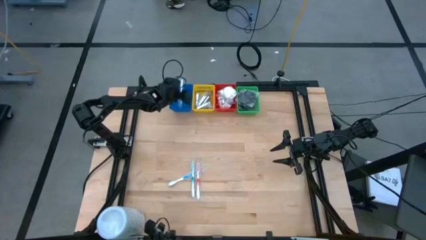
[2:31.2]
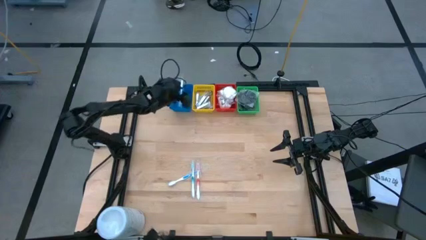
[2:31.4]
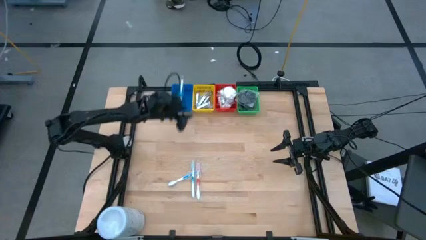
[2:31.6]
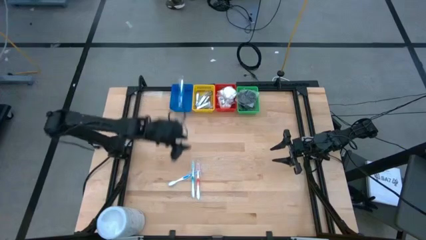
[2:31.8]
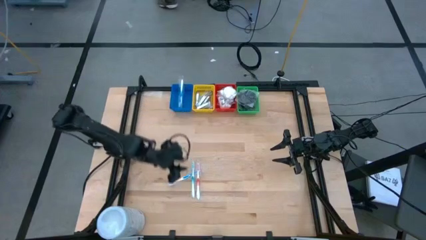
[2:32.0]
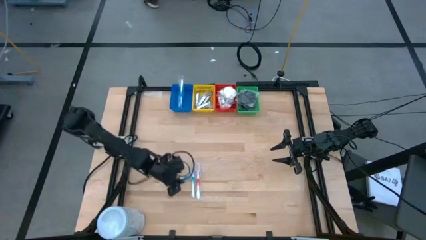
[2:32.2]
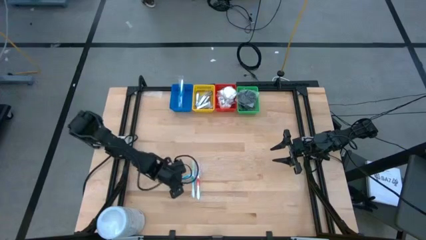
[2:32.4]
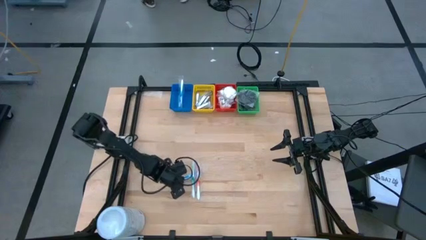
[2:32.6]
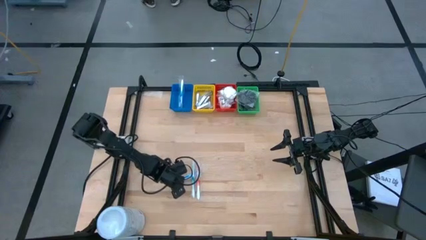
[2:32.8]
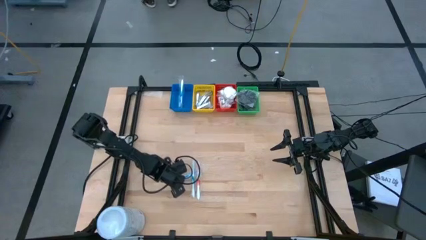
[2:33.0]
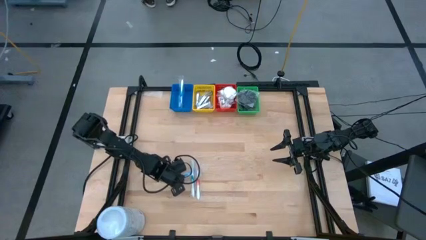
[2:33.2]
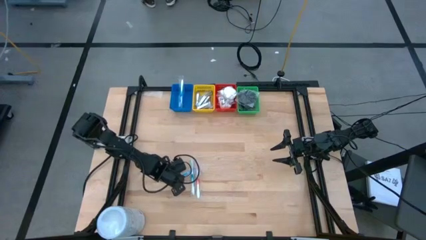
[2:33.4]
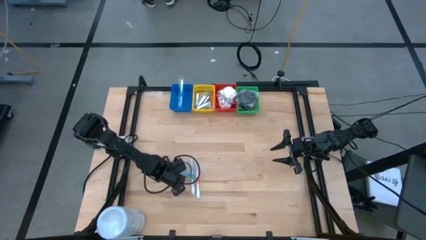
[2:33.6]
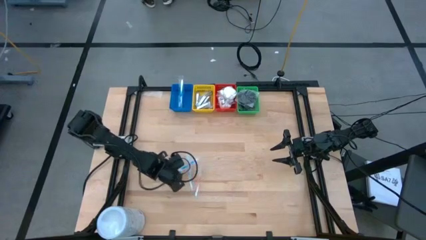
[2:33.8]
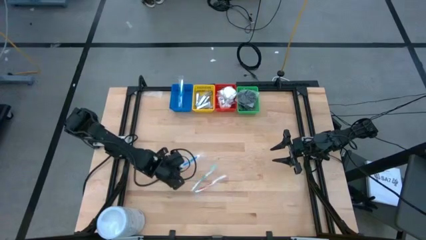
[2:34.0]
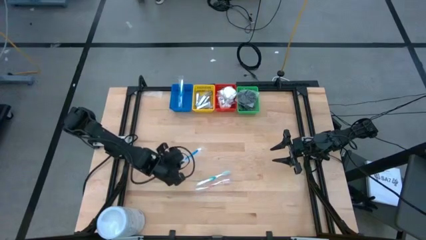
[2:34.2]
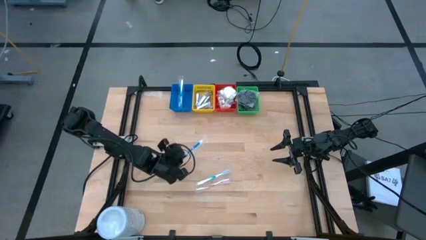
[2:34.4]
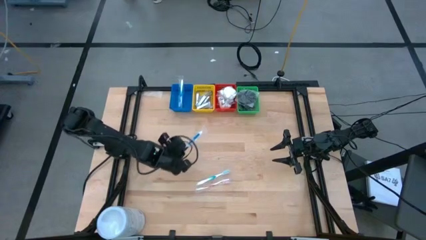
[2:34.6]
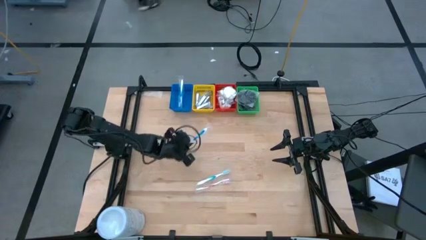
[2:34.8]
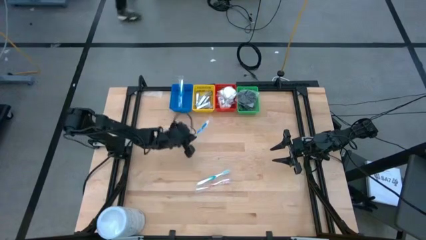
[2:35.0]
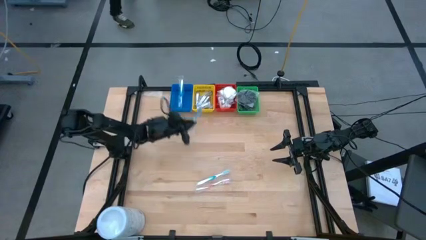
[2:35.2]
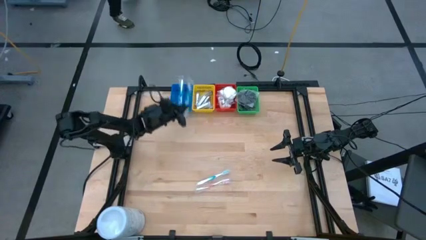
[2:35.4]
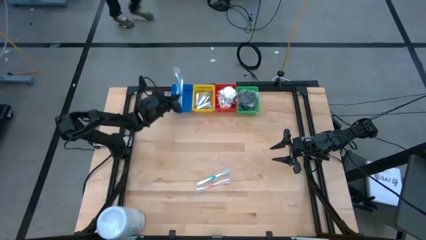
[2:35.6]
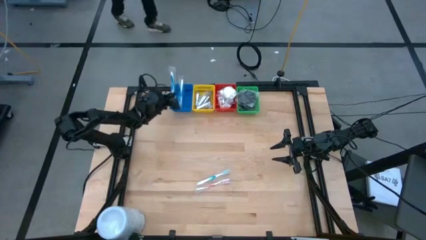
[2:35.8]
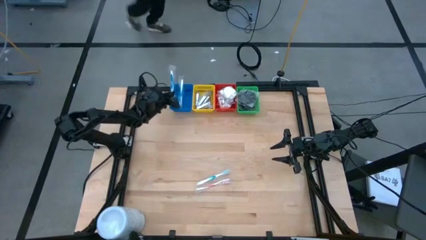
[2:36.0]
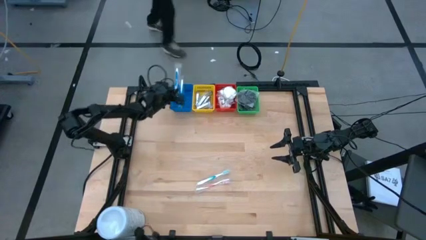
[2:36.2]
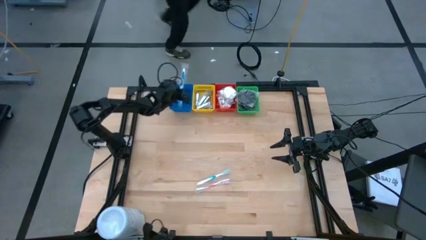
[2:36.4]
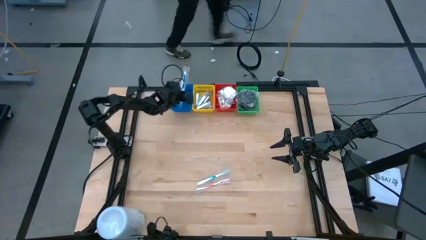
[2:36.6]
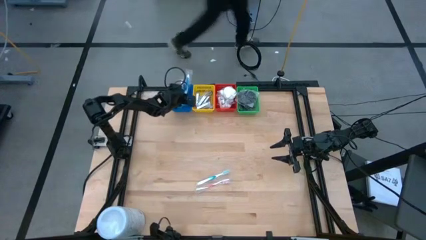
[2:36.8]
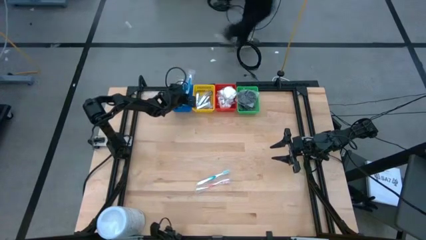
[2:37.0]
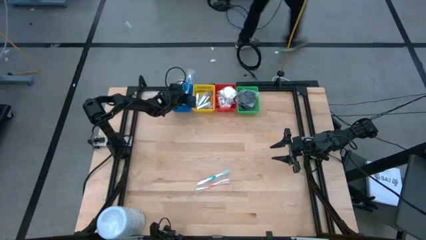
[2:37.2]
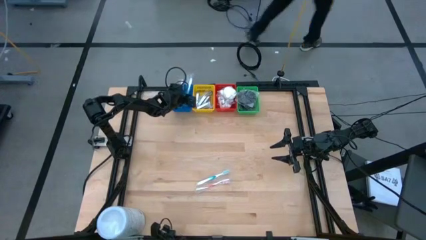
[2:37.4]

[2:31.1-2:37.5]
Task: Pick & Place Travel size toiletries
Put the blue toothbrush into the blue bin

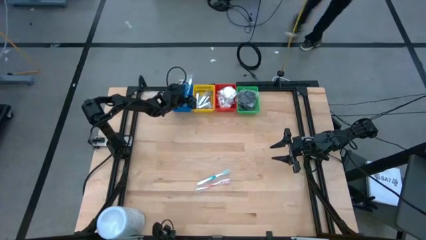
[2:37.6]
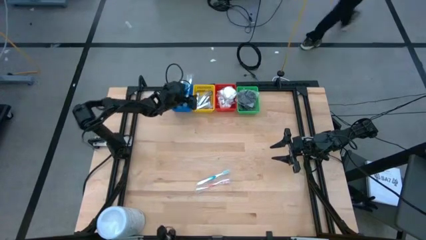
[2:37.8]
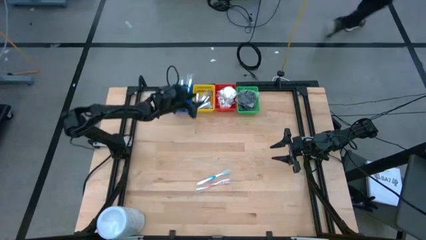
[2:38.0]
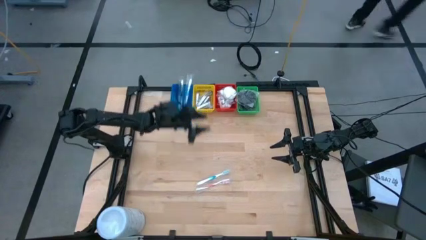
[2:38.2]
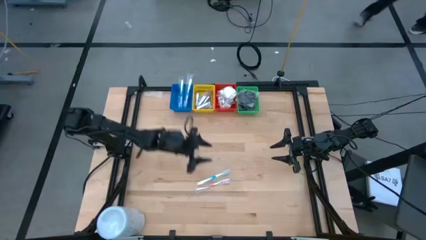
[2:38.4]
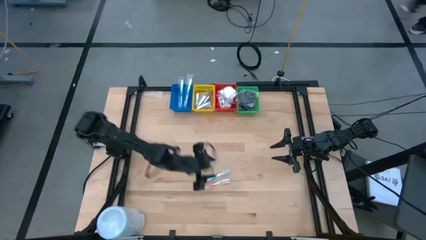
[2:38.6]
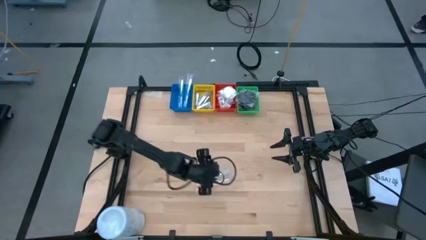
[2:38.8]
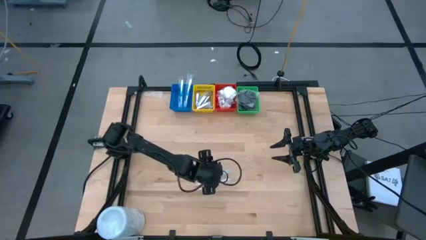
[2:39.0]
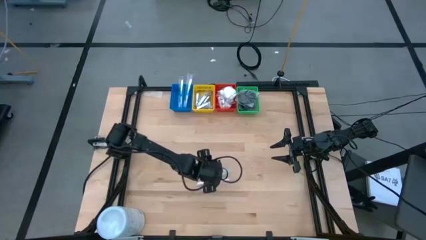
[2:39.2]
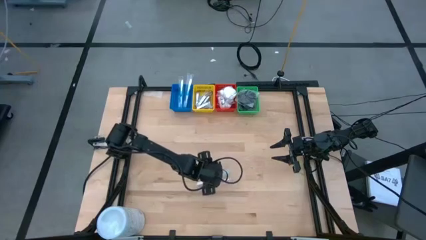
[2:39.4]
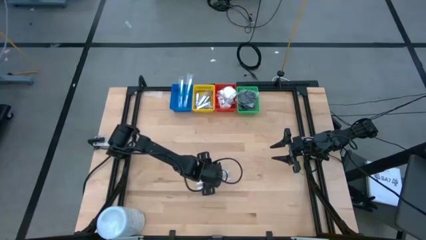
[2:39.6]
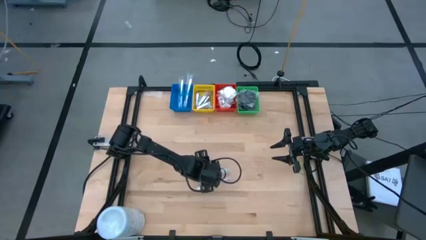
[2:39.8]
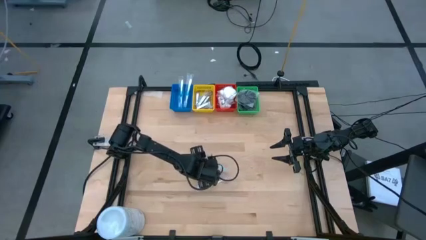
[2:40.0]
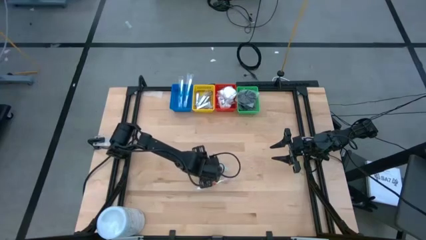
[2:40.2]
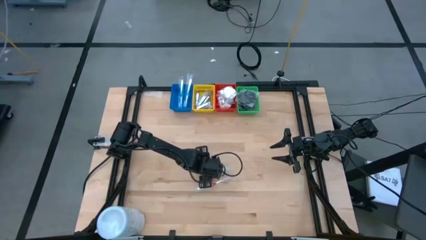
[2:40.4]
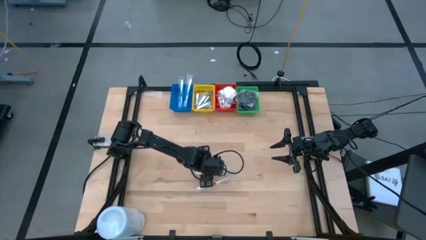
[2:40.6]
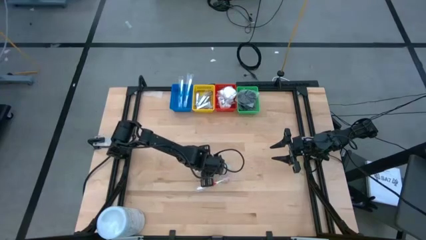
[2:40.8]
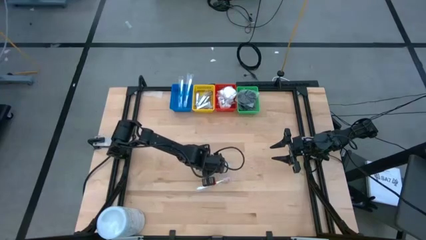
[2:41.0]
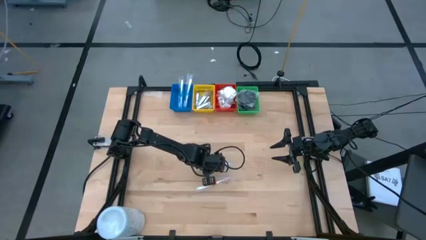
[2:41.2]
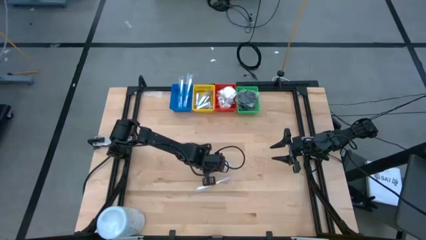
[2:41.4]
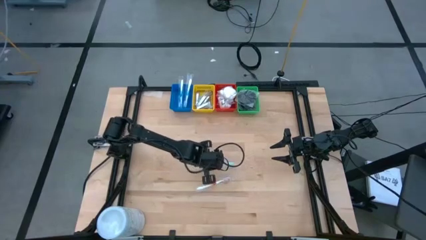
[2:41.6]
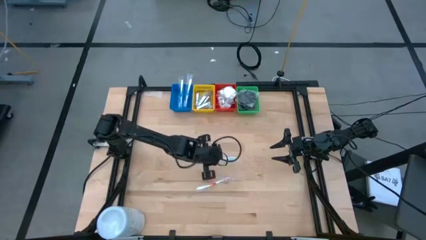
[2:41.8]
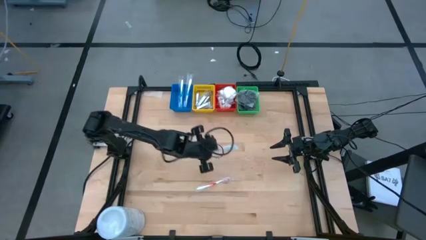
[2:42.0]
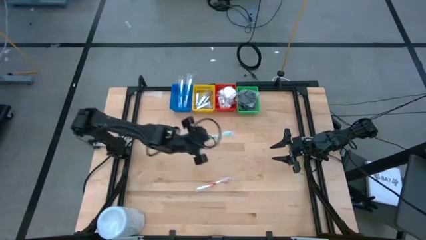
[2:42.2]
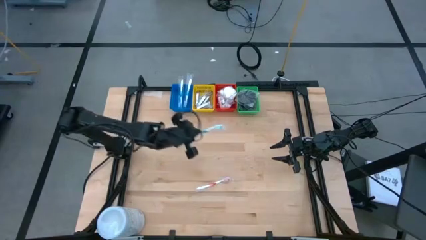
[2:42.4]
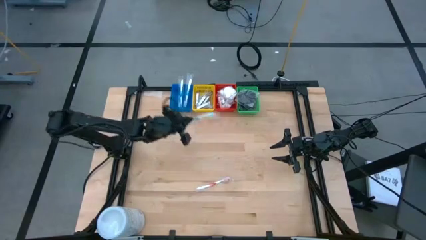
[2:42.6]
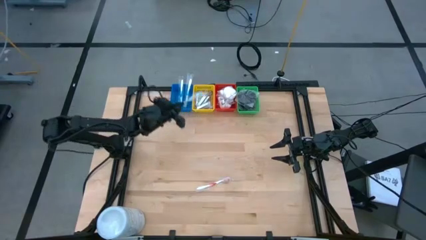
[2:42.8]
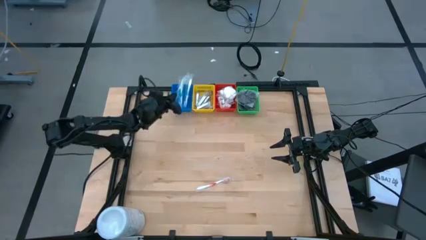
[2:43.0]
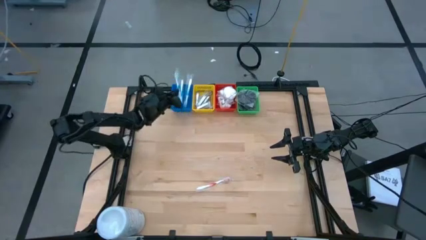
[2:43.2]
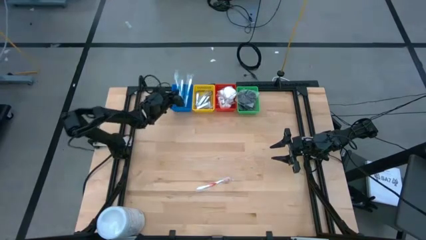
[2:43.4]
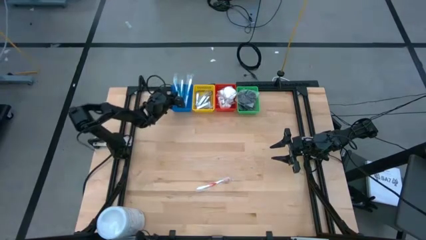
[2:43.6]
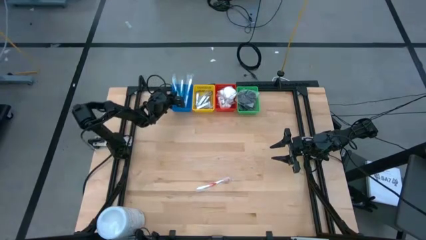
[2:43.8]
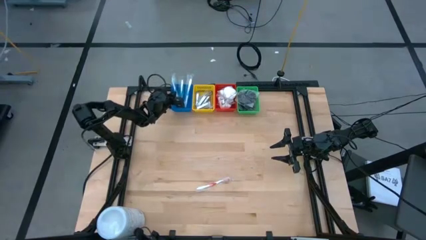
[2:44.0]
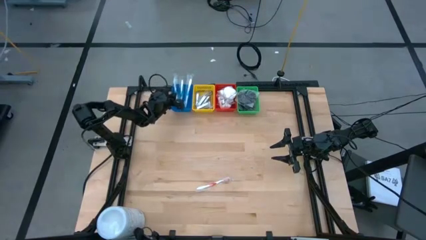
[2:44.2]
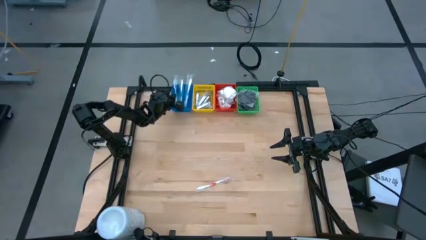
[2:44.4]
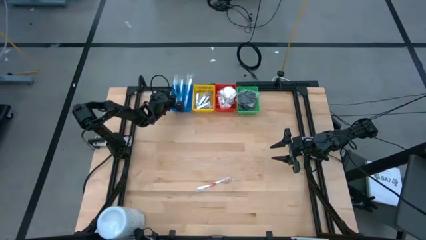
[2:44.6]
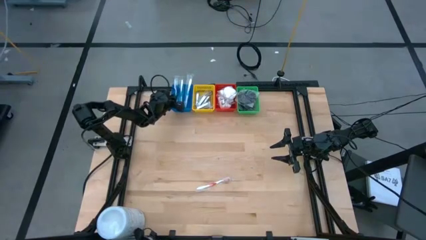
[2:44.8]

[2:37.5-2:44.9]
Put the green toothbrush into the blue bin

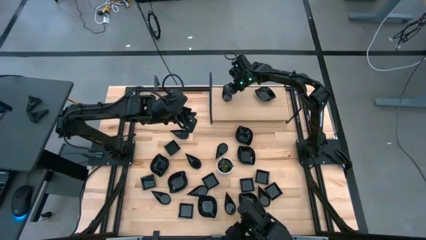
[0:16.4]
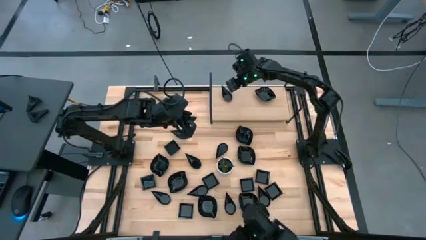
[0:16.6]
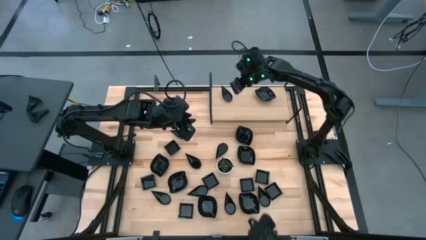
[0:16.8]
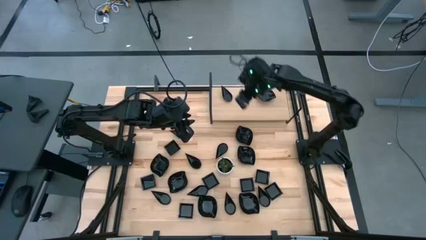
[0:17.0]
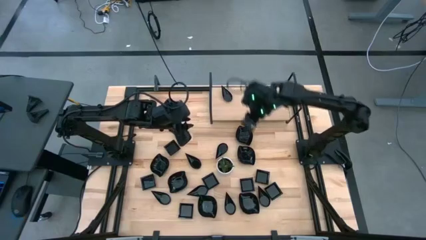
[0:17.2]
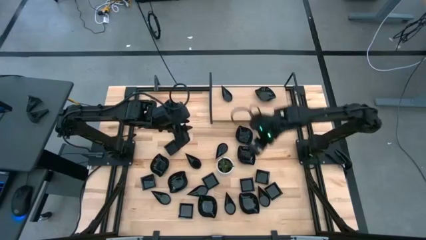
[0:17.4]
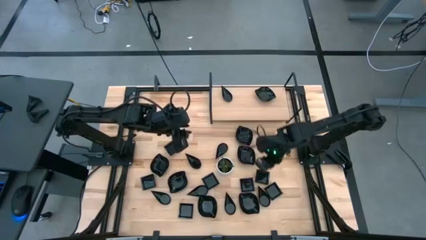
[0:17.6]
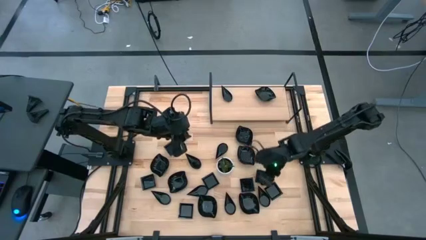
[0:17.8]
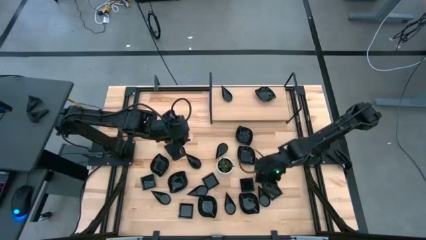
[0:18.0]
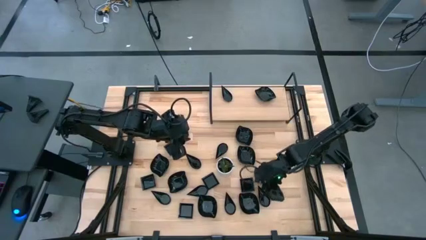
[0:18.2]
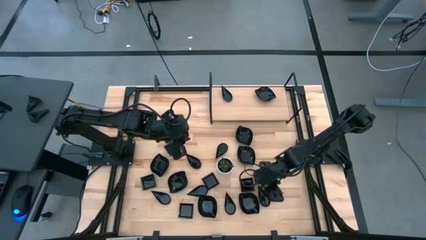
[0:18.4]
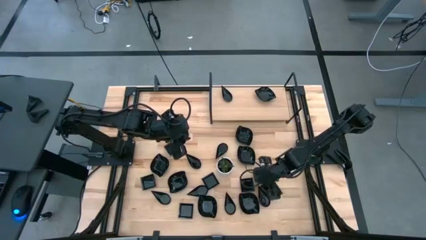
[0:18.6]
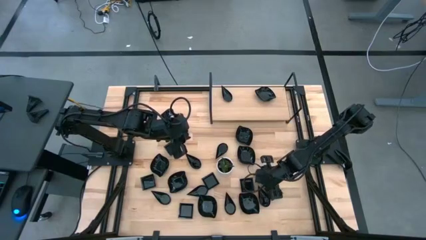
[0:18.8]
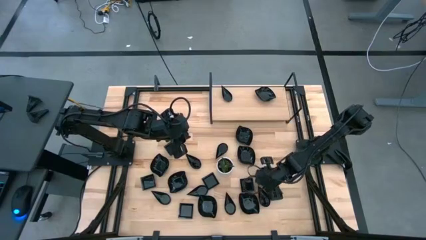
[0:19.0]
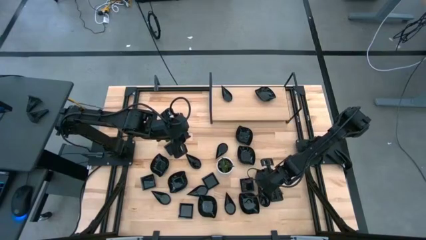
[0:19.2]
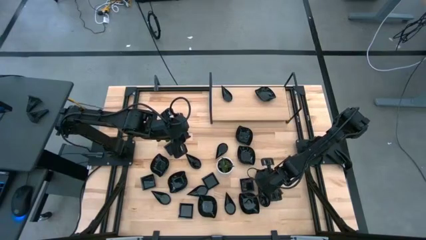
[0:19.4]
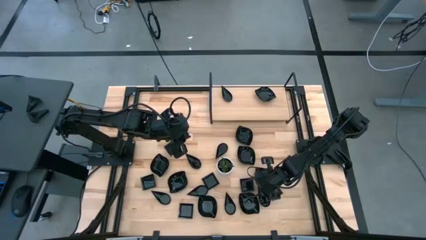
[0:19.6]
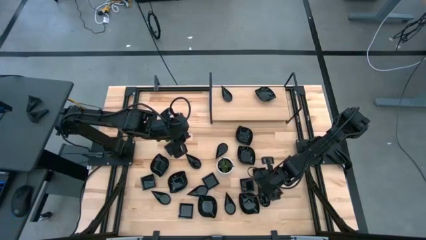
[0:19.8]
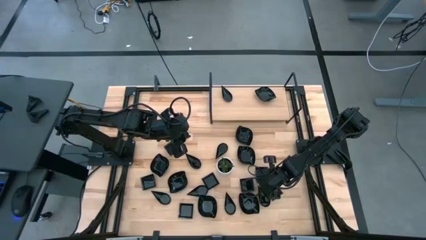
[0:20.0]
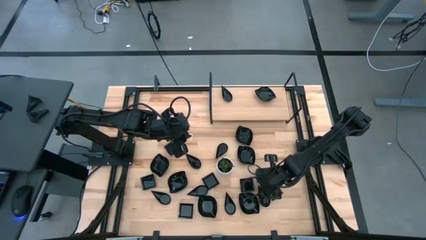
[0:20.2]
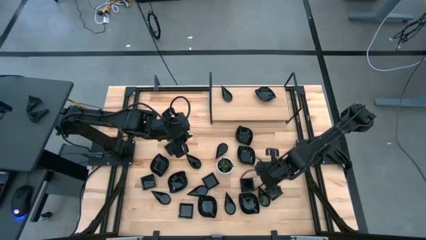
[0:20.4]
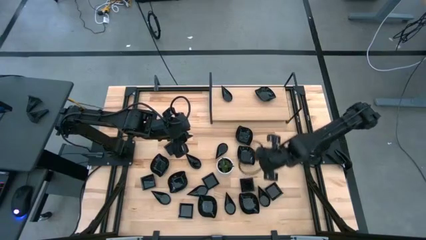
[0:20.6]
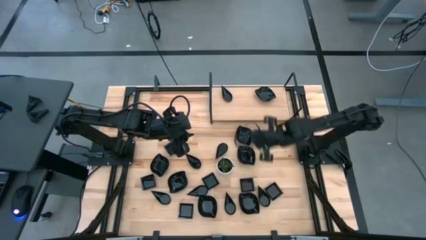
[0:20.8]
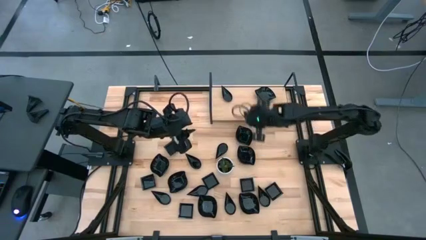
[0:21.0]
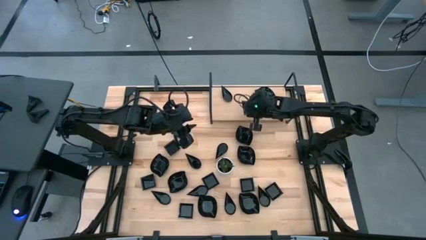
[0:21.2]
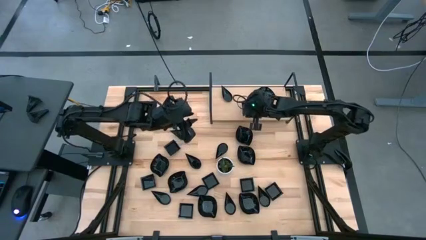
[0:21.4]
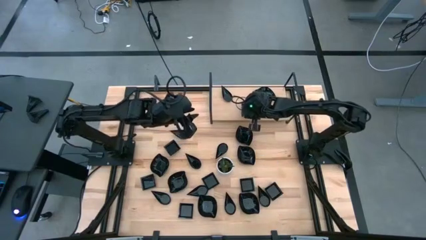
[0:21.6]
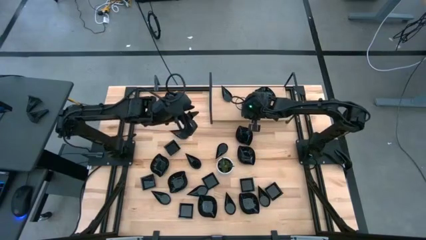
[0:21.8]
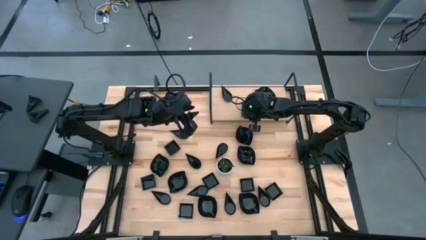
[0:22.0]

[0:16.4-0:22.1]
Task: Pick & Place Mini shaped plates
Put the square plate on the shelf
